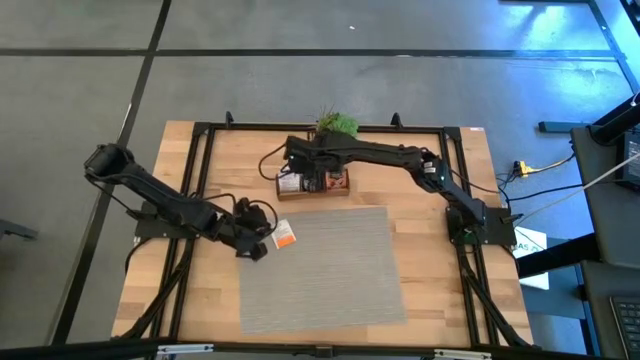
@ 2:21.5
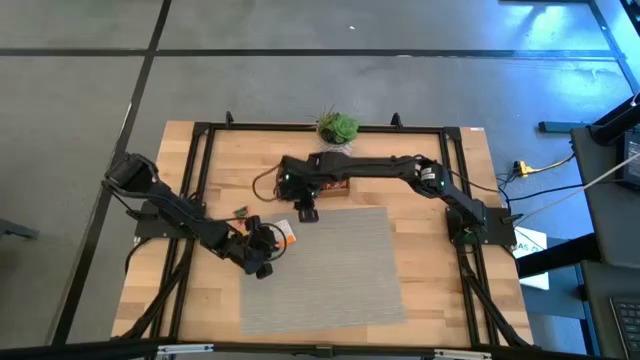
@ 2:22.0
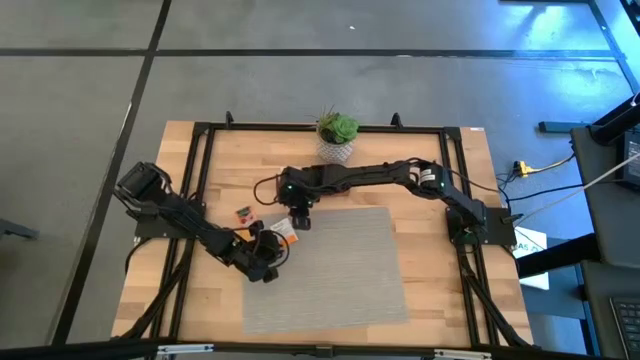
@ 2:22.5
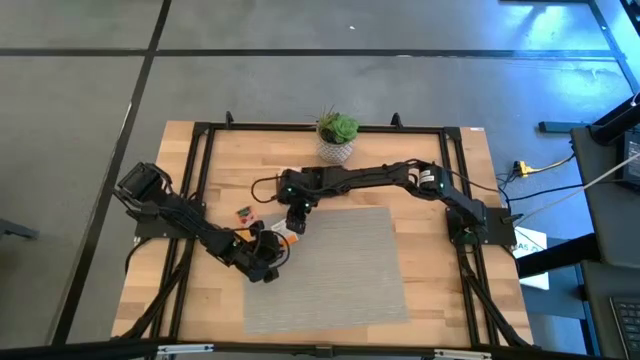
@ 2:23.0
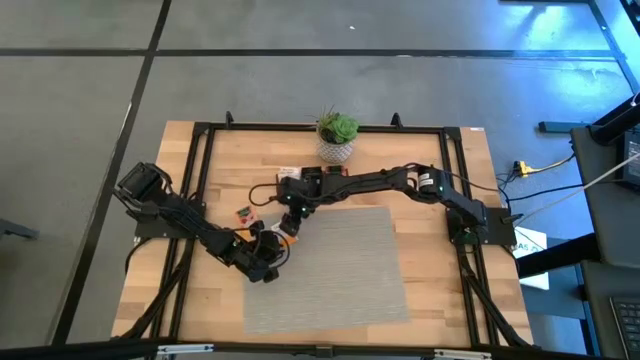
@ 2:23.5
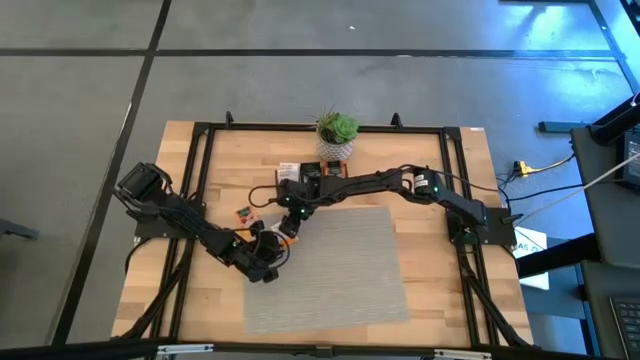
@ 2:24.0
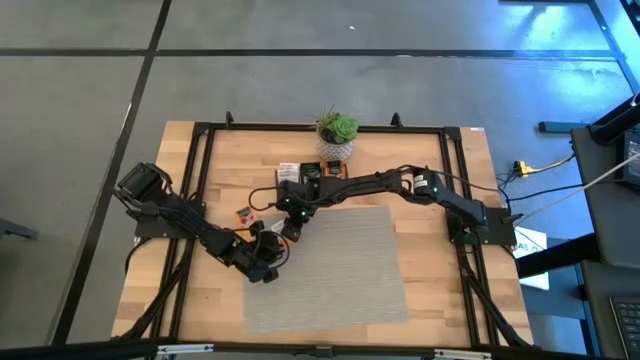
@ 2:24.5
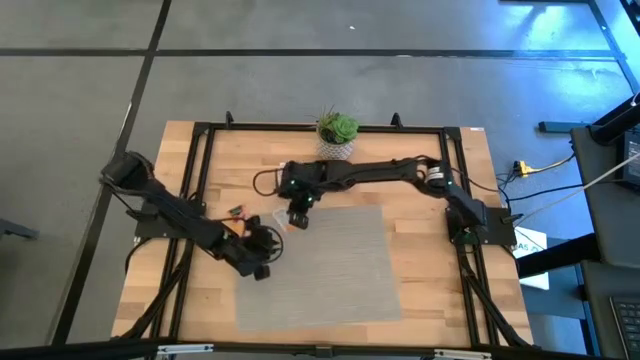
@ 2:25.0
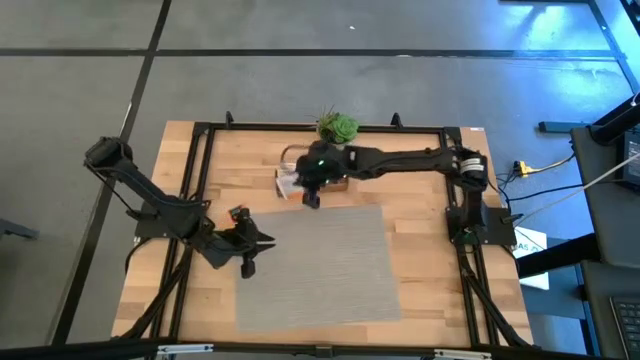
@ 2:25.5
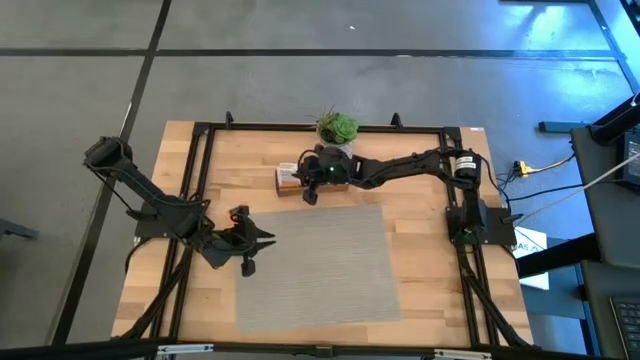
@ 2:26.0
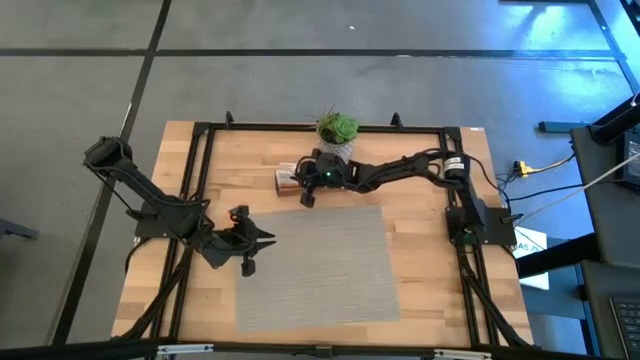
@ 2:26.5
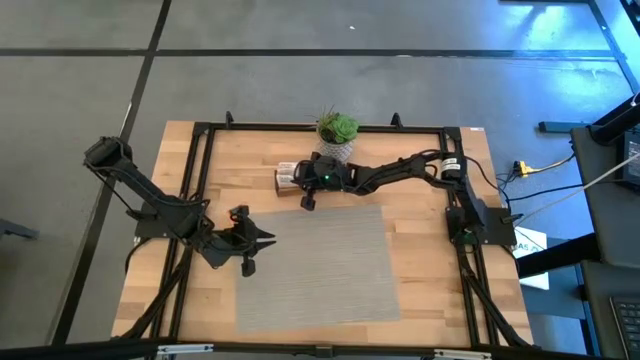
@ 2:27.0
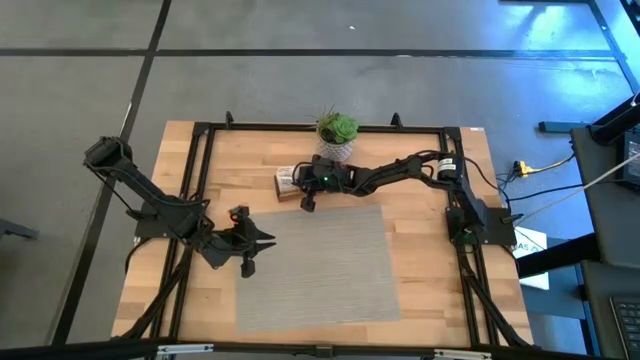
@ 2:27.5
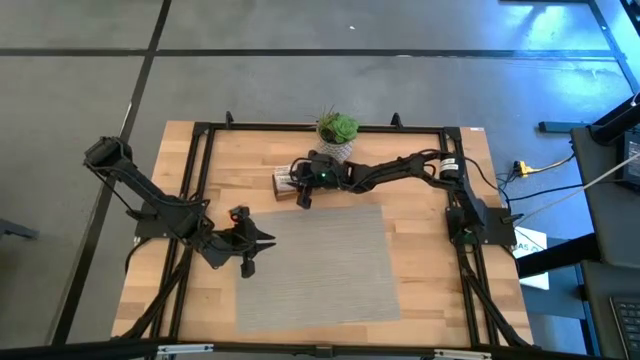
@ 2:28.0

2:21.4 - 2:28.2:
Task: Pick & Place Tea
Put the white tea bag into the left section of the wooden organizer

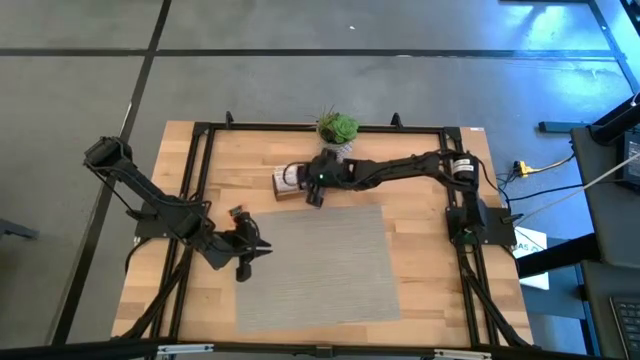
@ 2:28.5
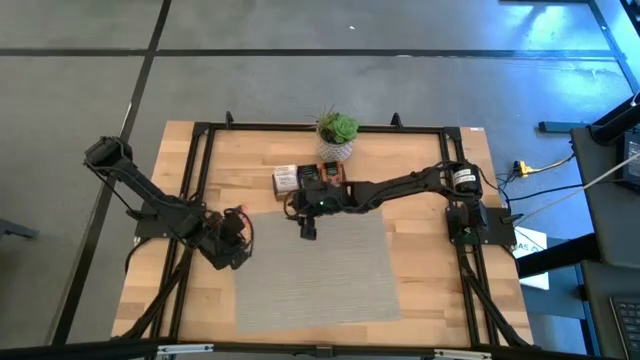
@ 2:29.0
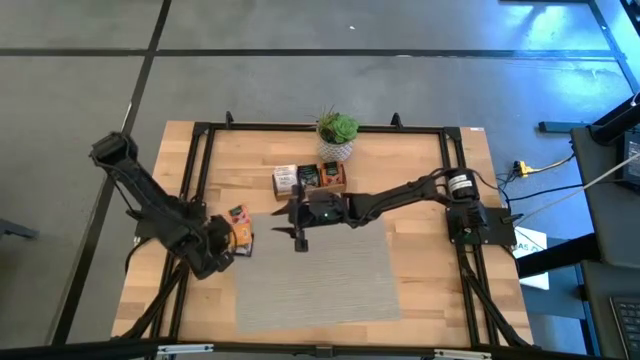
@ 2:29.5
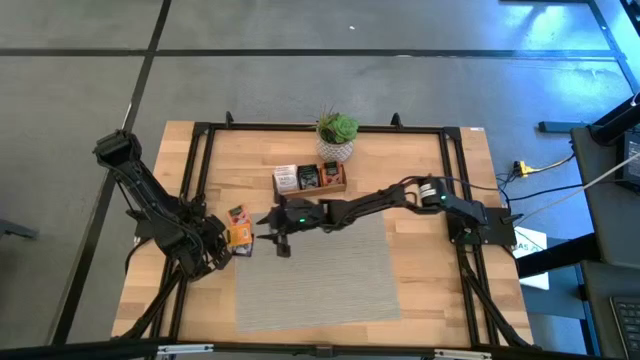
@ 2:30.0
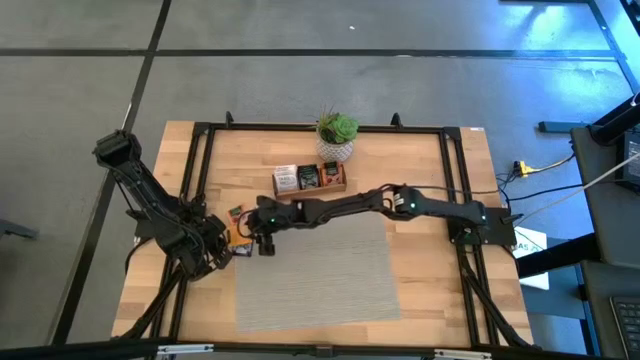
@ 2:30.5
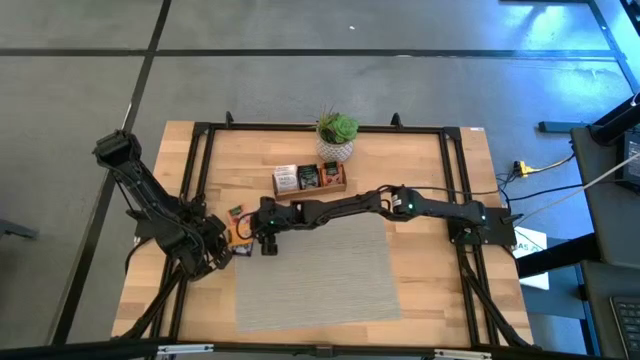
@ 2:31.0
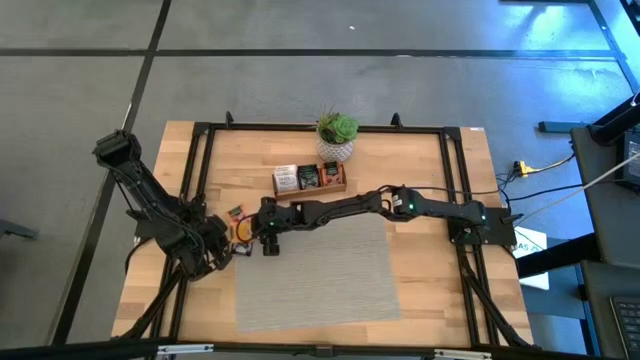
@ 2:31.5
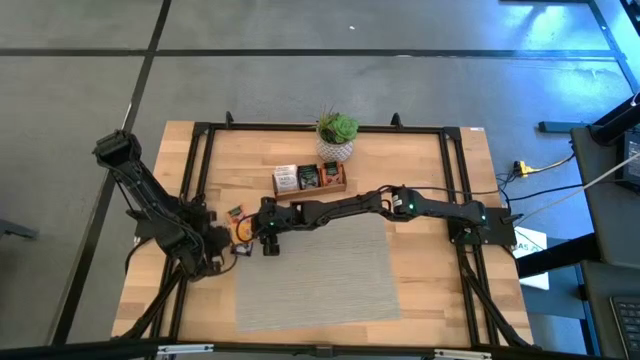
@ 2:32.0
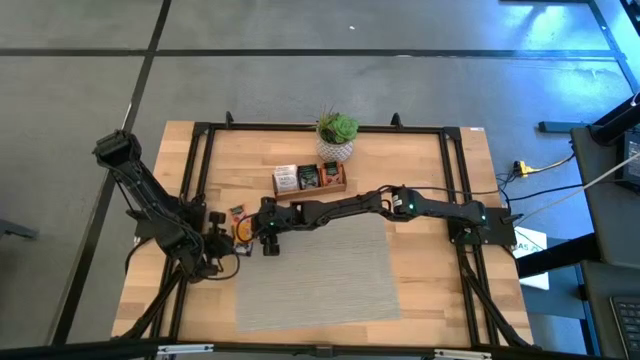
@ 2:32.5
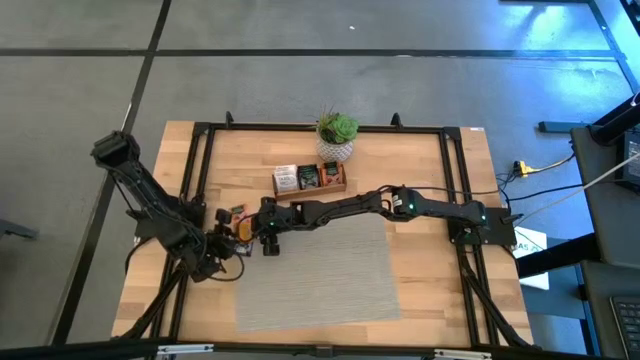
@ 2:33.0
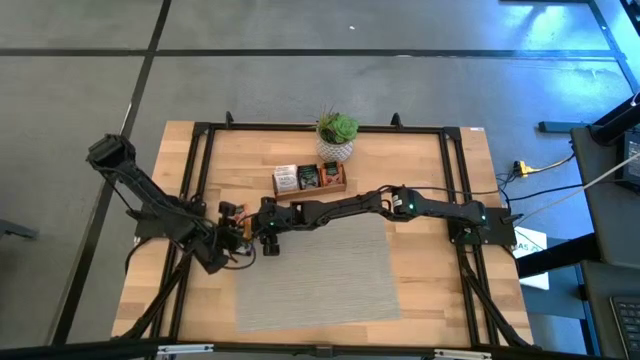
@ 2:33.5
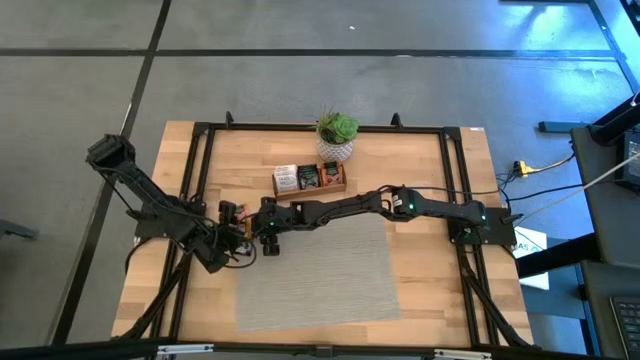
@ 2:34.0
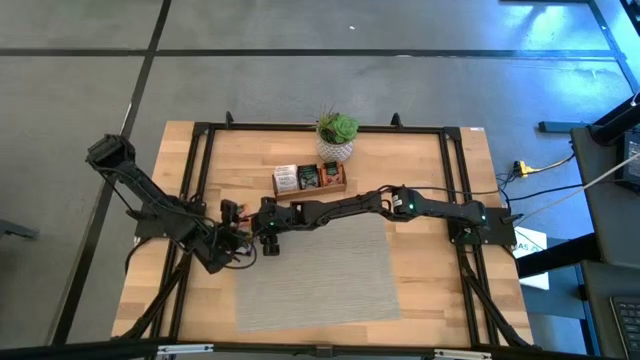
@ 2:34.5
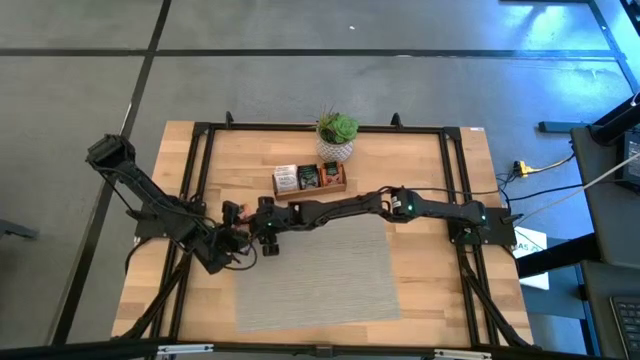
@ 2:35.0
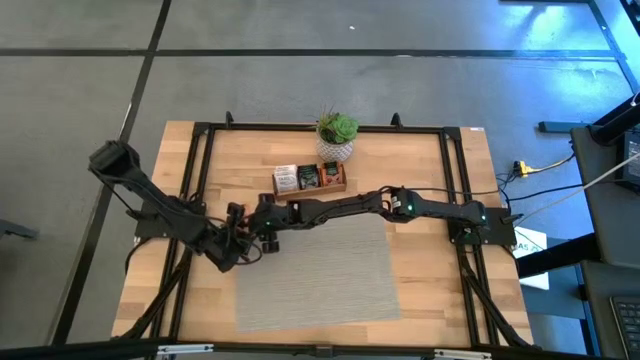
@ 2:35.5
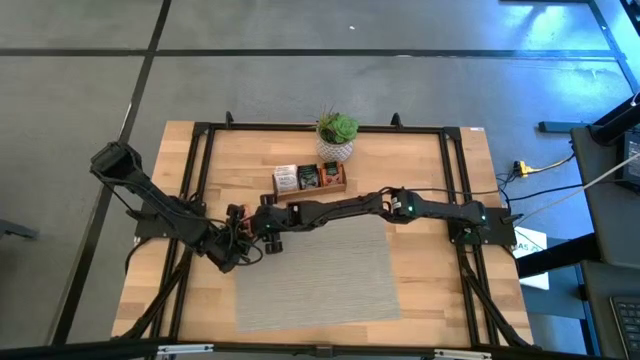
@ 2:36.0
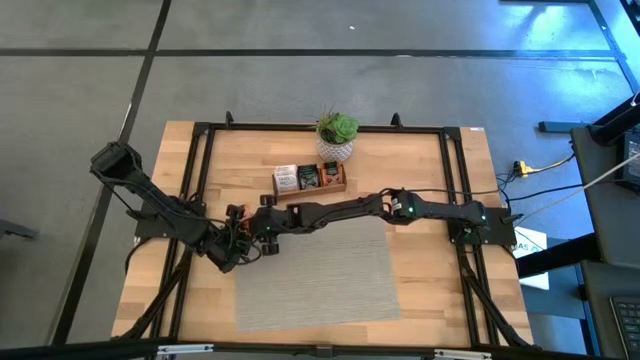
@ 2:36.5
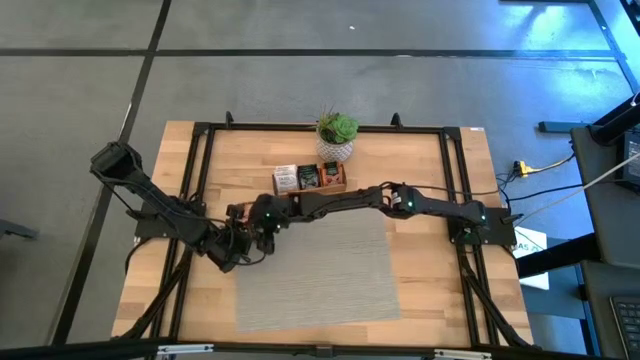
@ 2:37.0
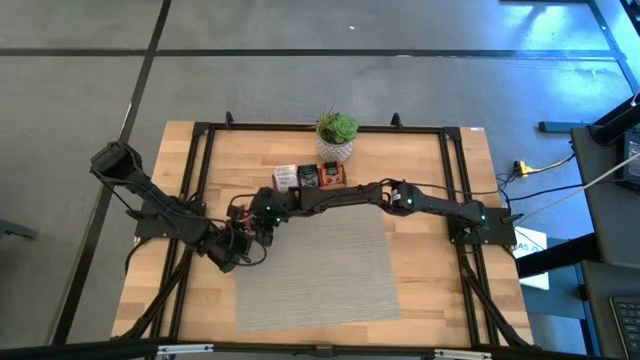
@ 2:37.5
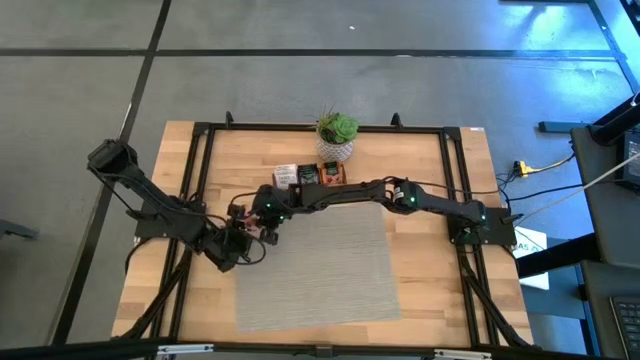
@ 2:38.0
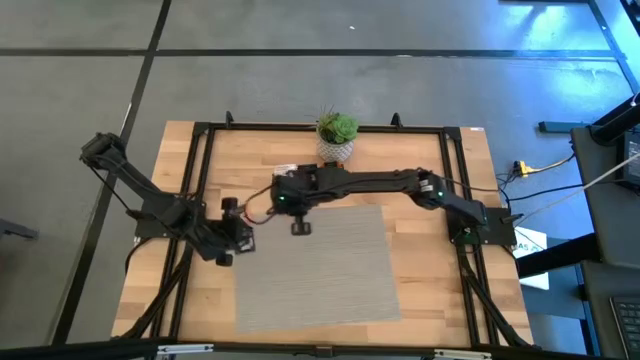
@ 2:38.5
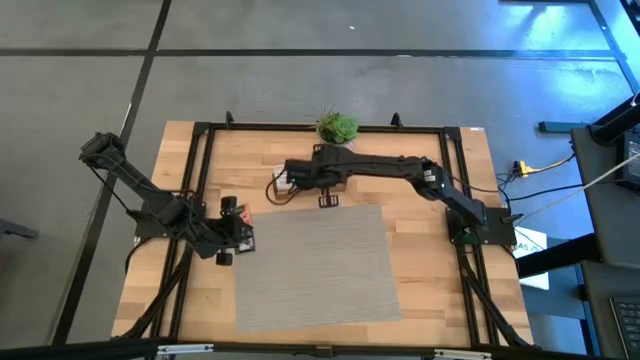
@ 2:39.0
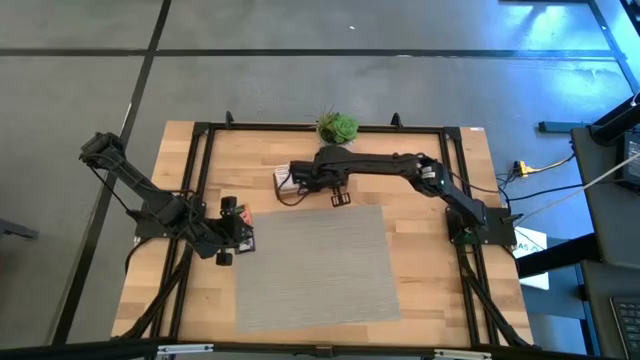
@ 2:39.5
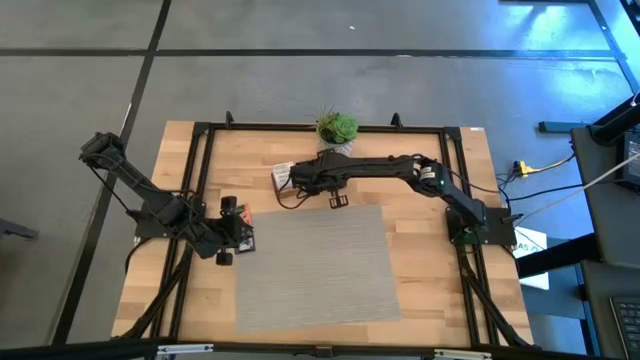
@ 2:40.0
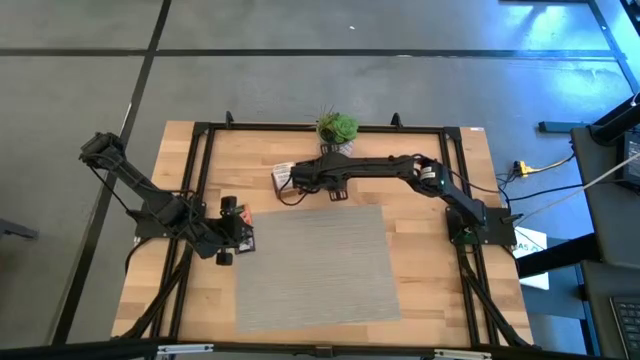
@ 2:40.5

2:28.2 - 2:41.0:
Put the orange tea bag into the right section of the wooden organizer

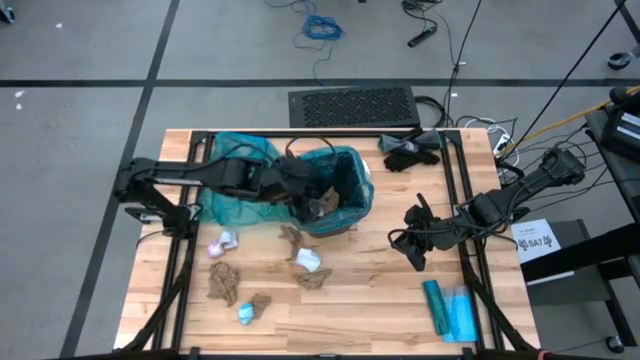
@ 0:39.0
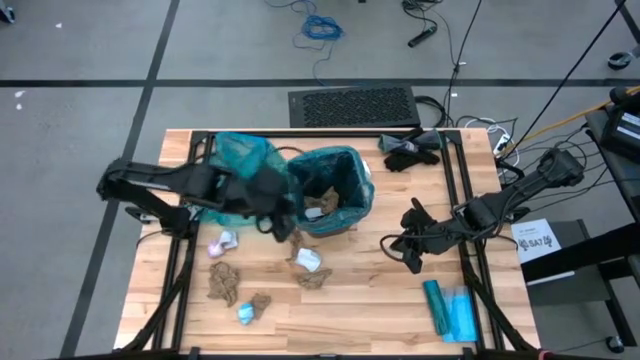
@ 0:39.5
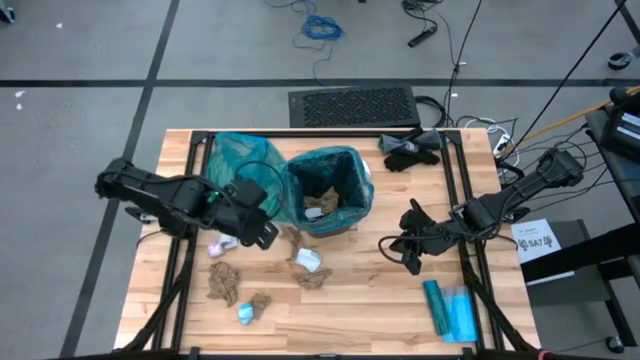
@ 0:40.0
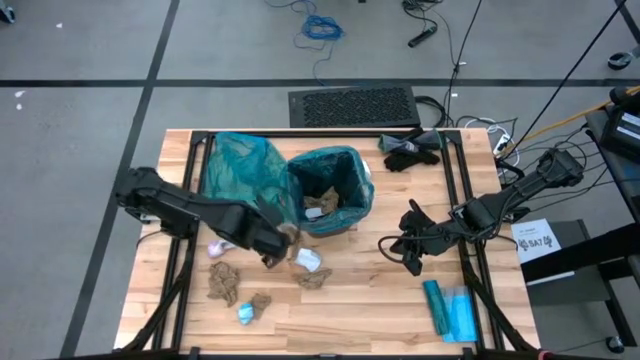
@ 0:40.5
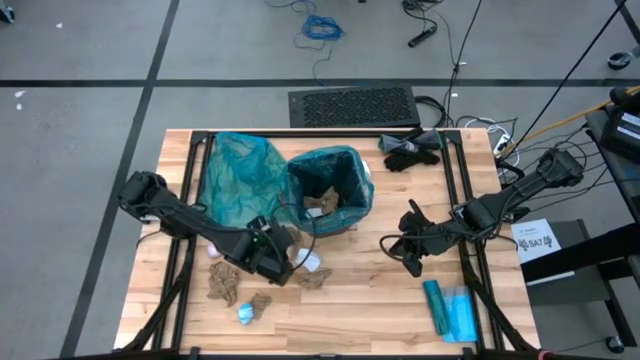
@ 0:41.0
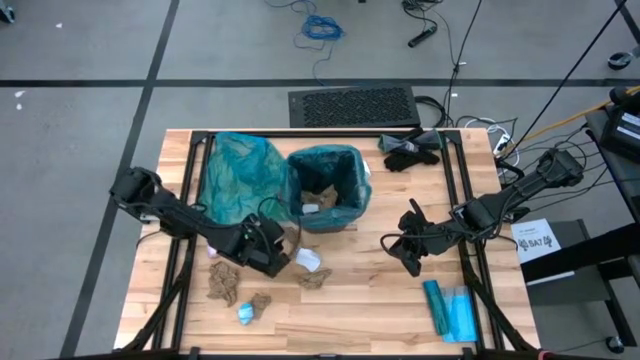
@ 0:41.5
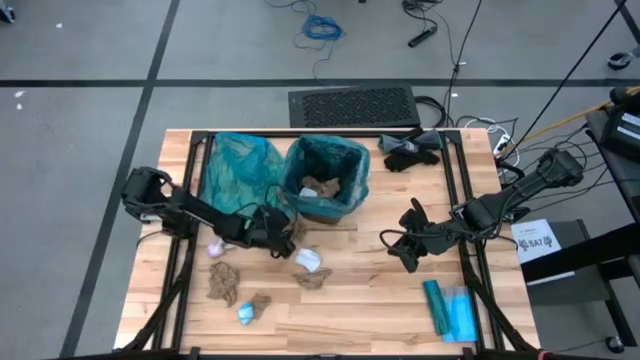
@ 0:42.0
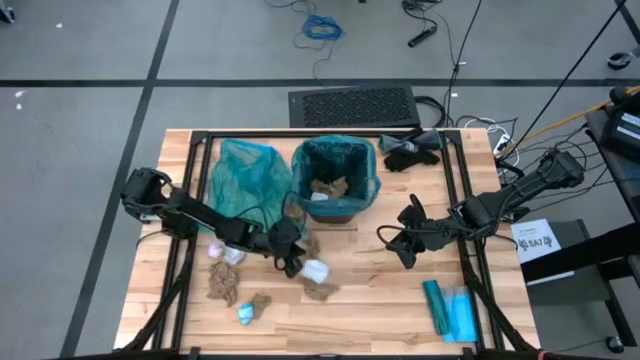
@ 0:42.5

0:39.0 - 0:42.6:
Task: place trash/remove bag and relplace
Put the brown napkin into the trash bin
